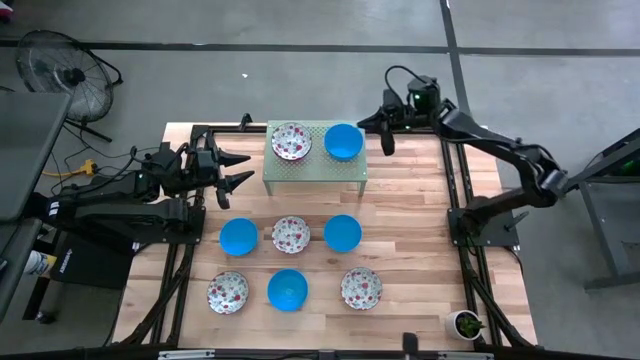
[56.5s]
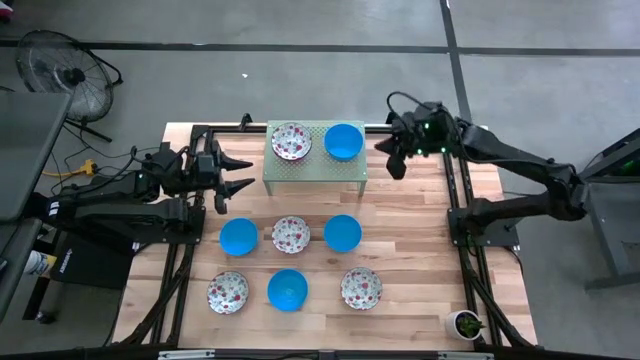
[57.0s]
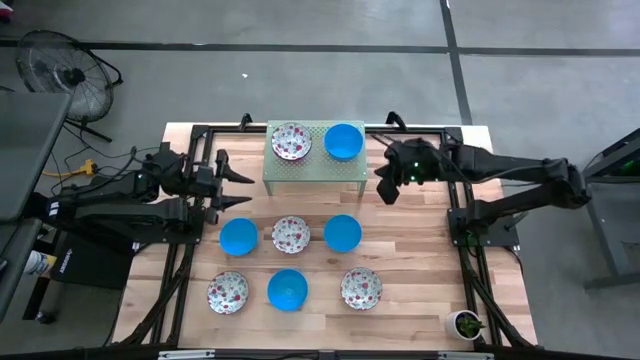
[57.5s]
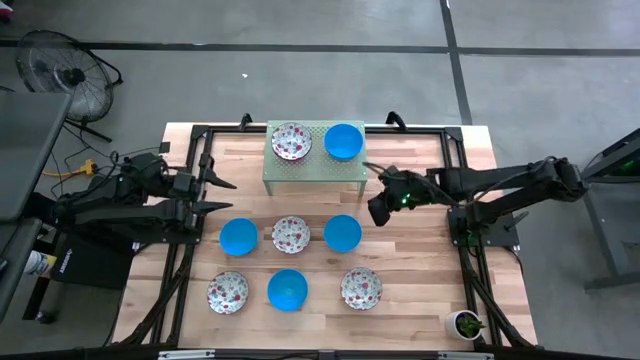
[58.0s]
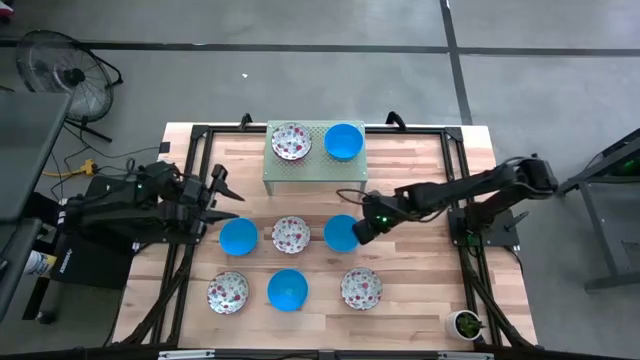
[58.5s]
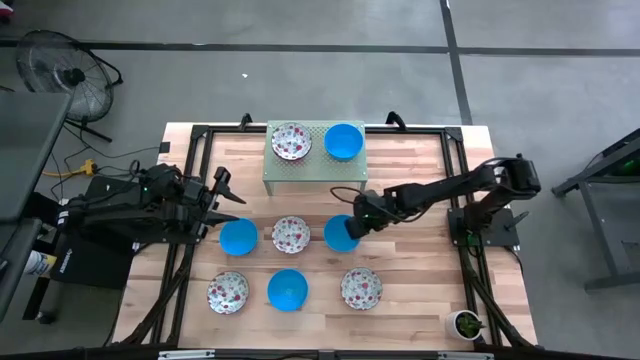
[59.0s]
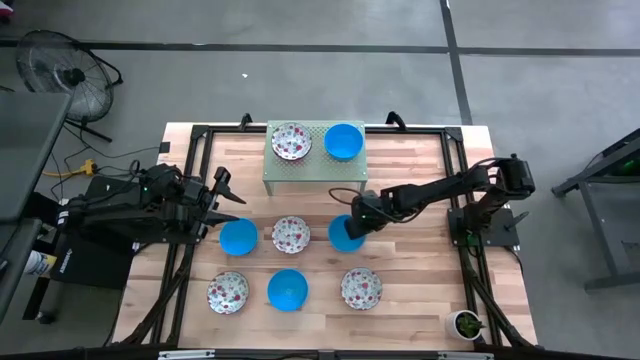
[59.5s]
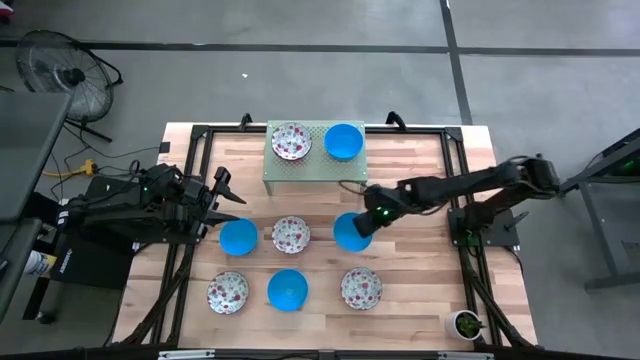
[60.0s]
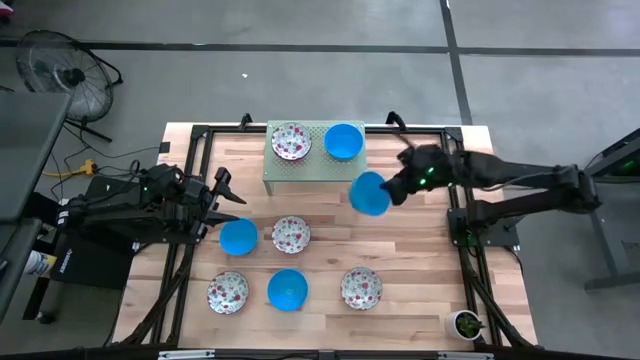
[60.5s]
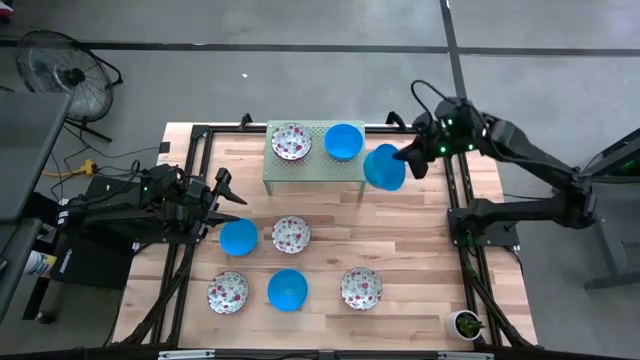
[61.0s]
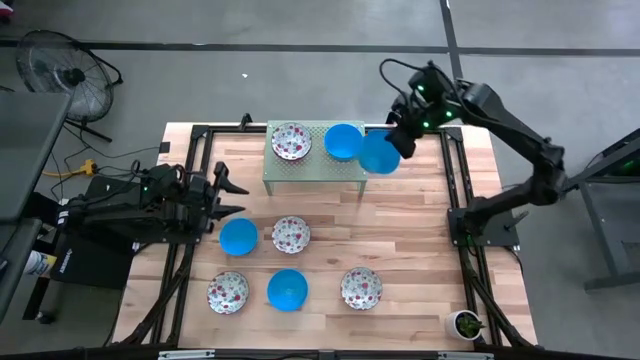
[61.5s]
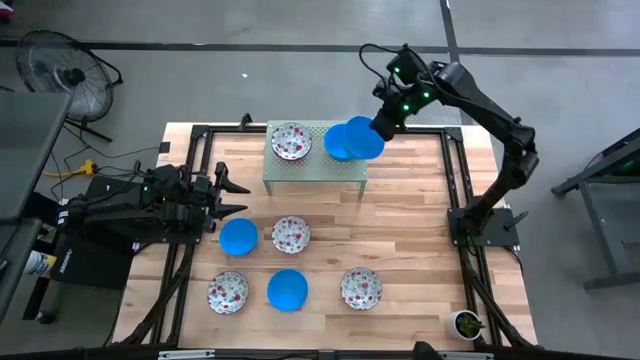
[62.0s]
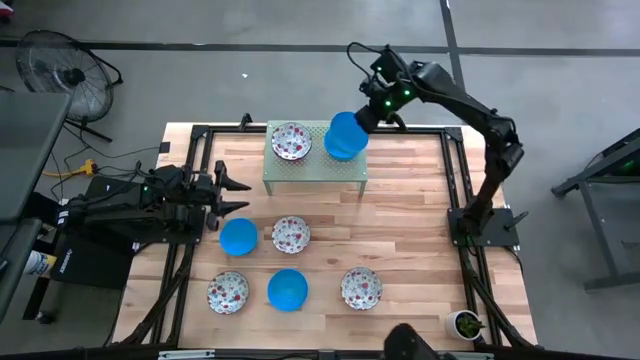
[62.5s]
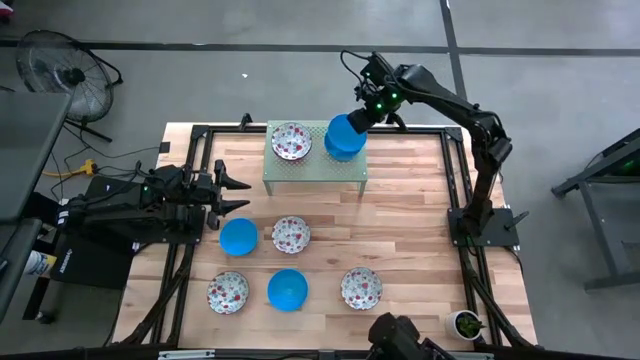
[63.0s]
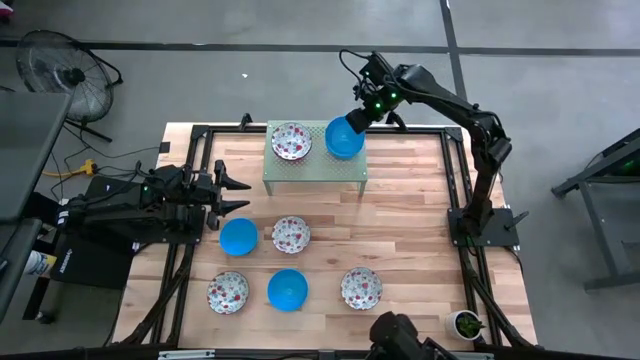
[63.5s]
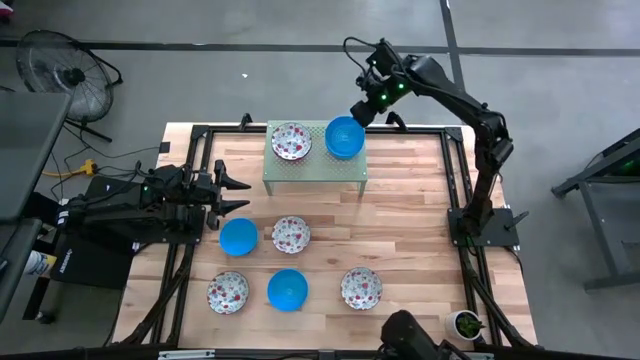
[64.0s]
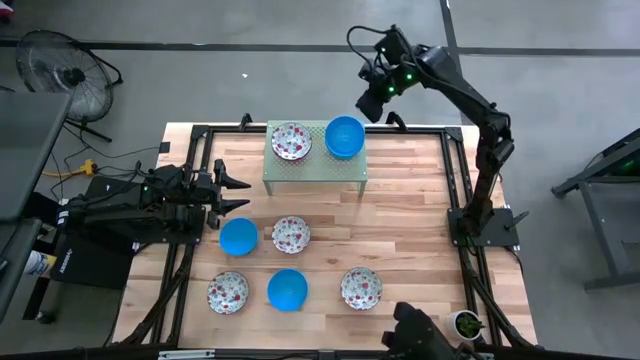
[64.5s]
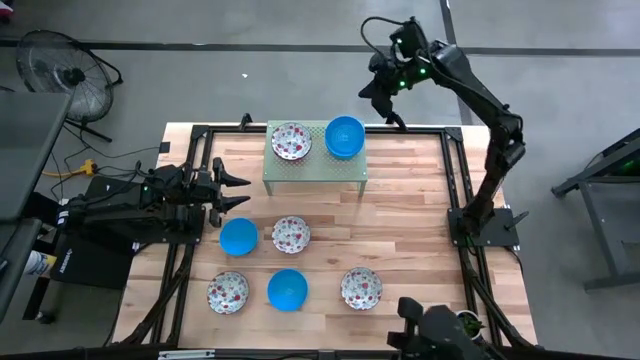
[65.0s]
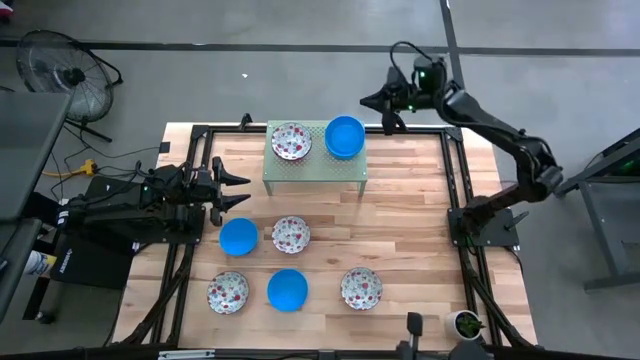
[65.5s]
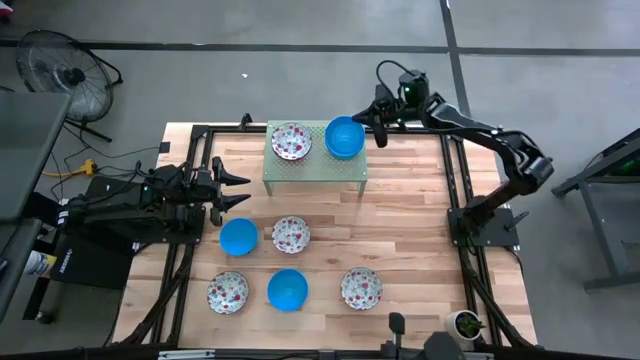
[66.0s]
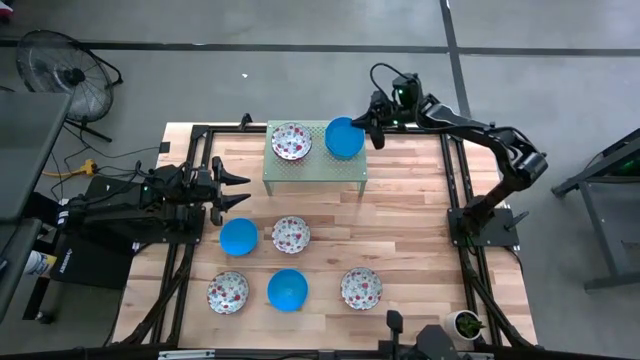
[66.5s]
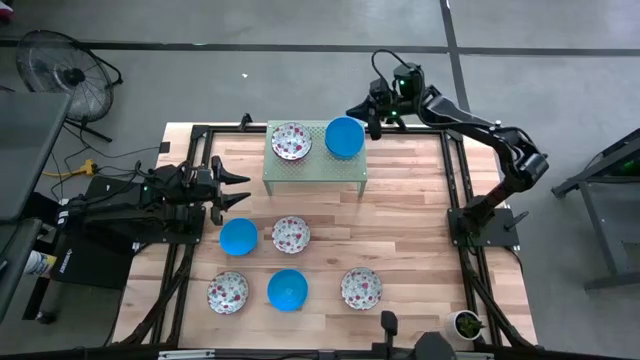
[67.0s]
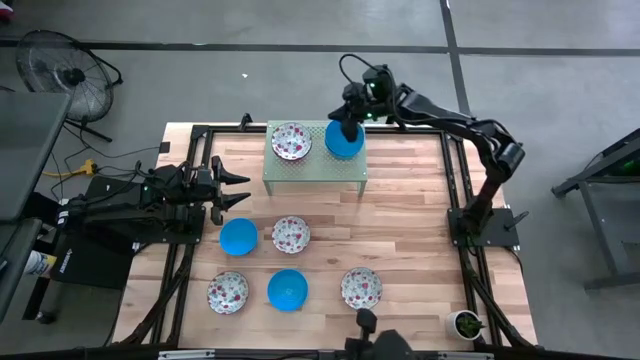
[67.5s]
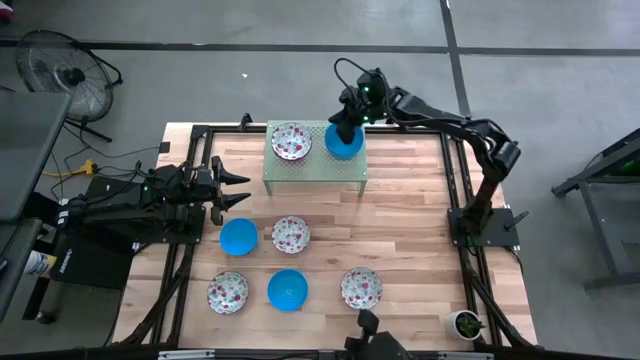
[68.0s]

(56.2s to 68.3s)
Task: Pick & Place Mini bowls
Stack the blue bowl on top of the stacked blue bowls on the shelf

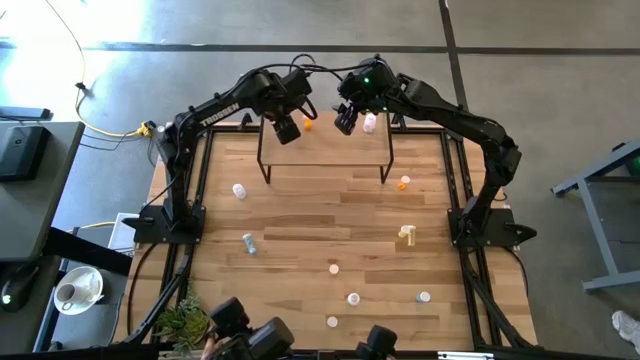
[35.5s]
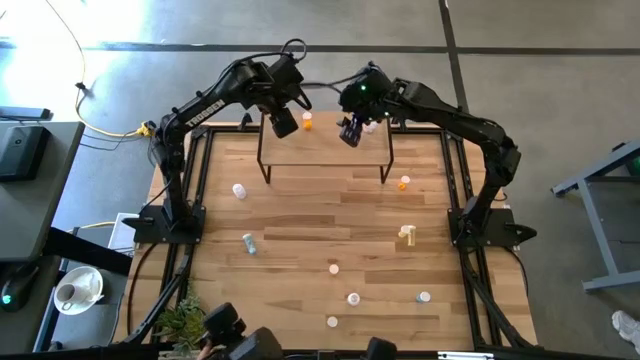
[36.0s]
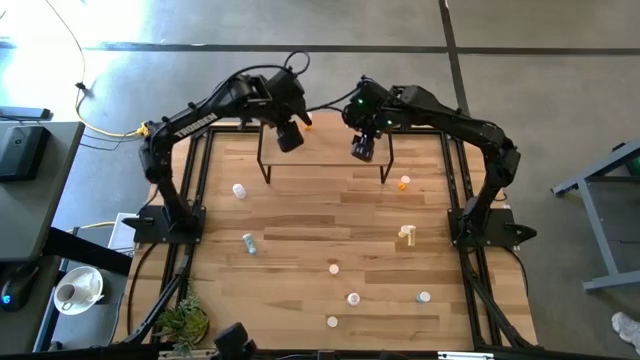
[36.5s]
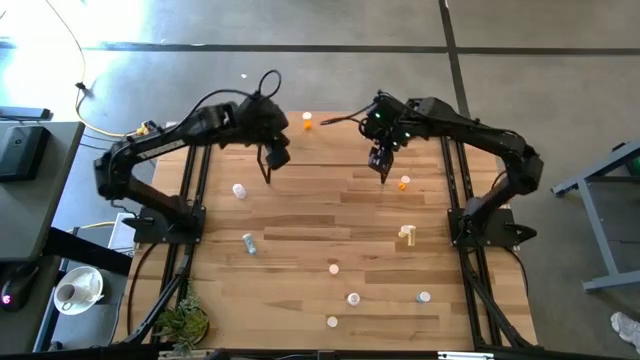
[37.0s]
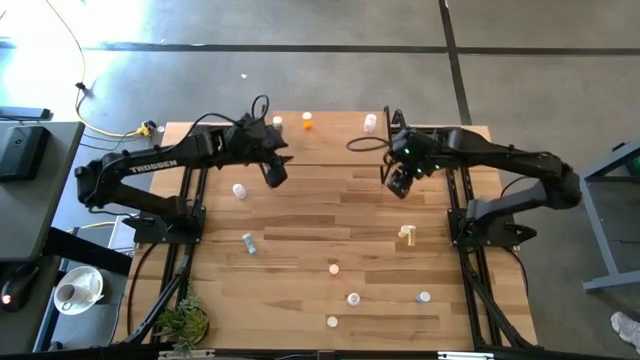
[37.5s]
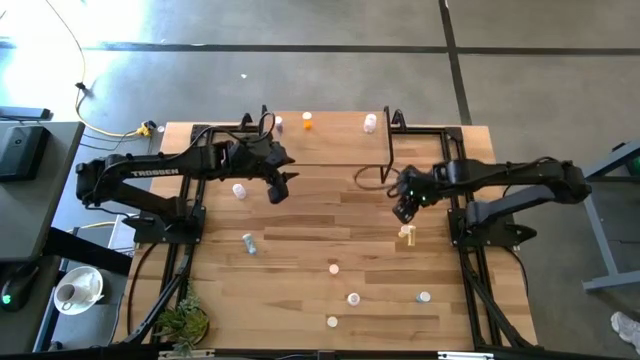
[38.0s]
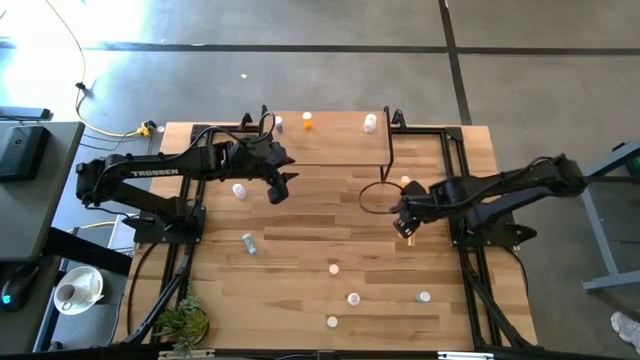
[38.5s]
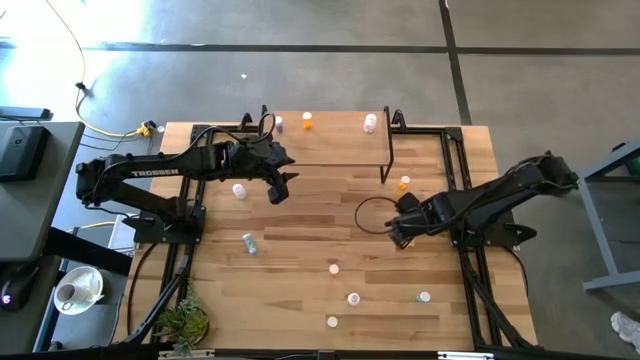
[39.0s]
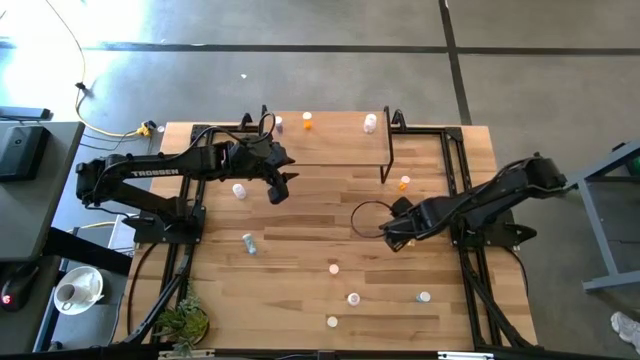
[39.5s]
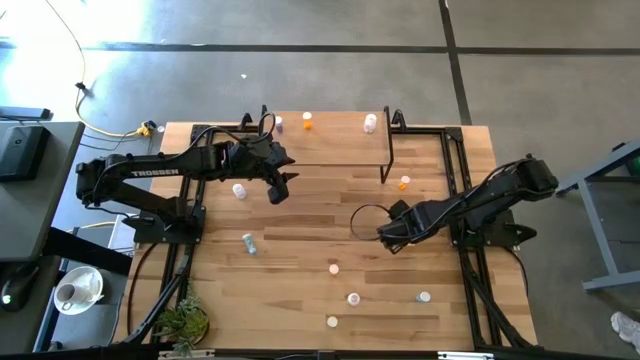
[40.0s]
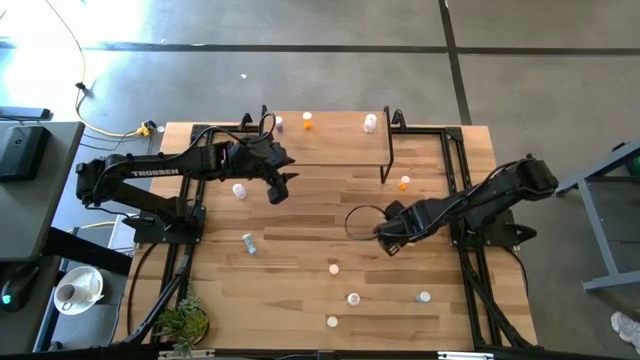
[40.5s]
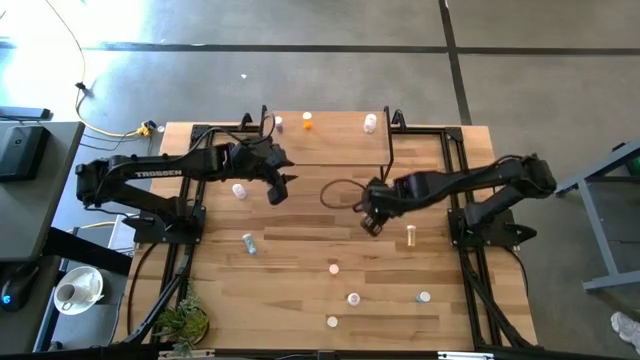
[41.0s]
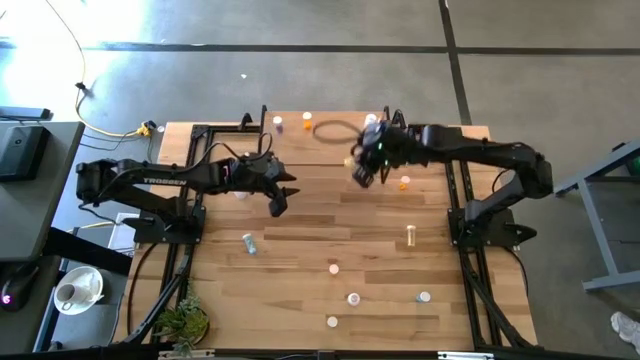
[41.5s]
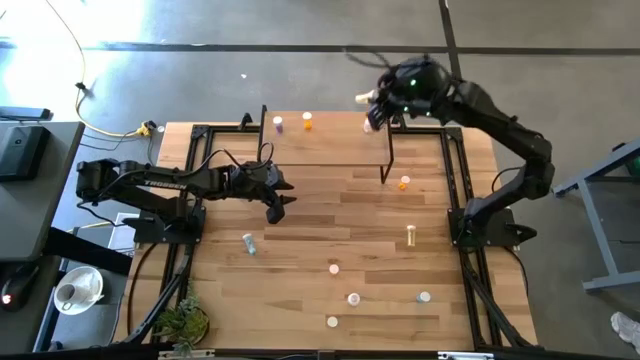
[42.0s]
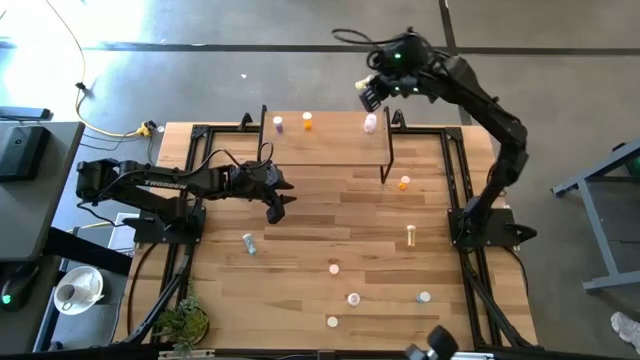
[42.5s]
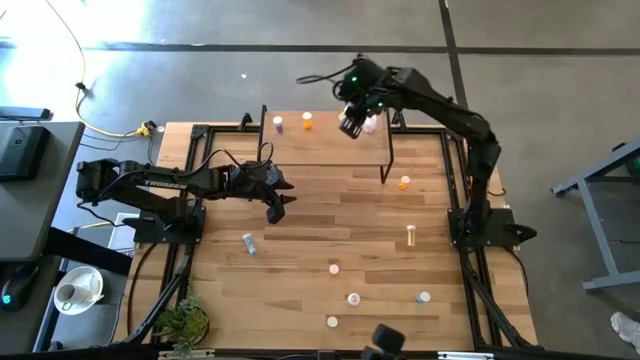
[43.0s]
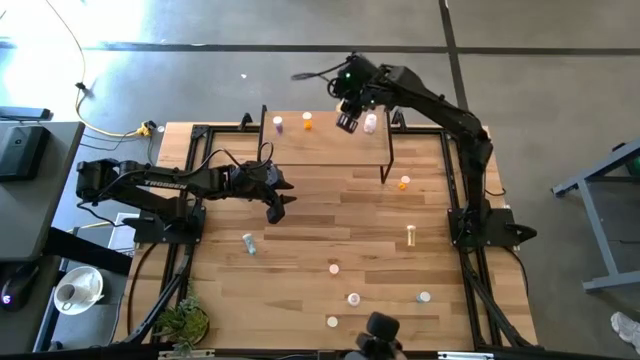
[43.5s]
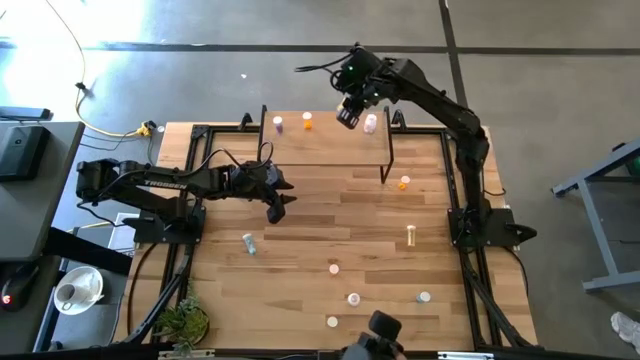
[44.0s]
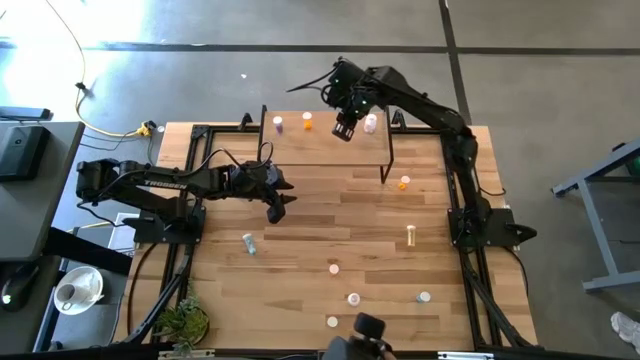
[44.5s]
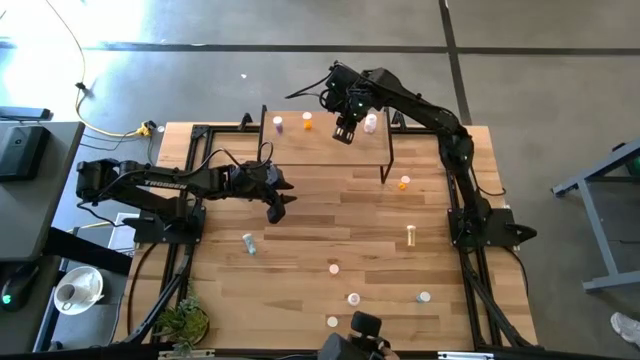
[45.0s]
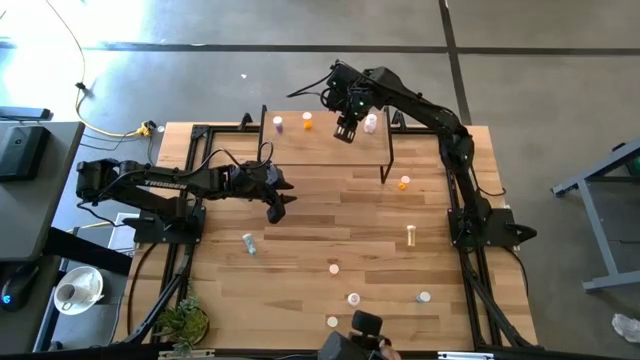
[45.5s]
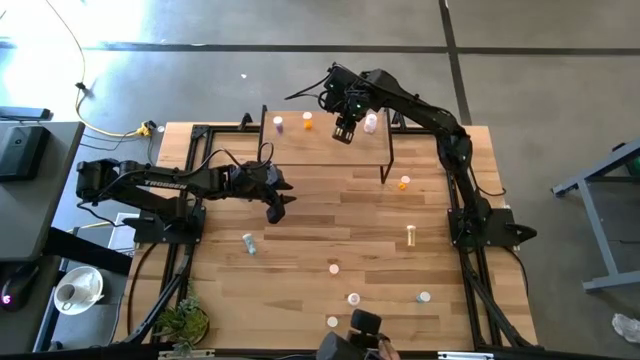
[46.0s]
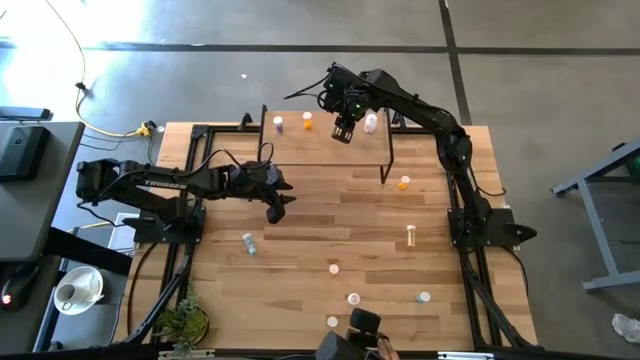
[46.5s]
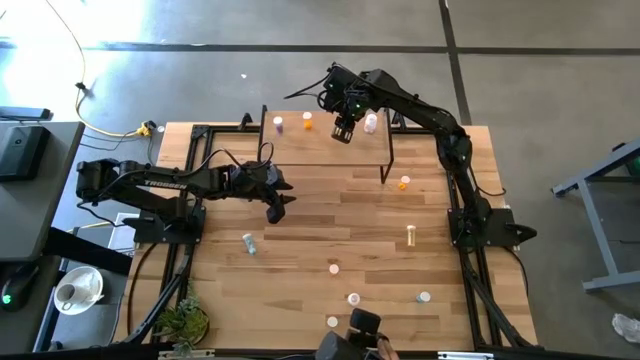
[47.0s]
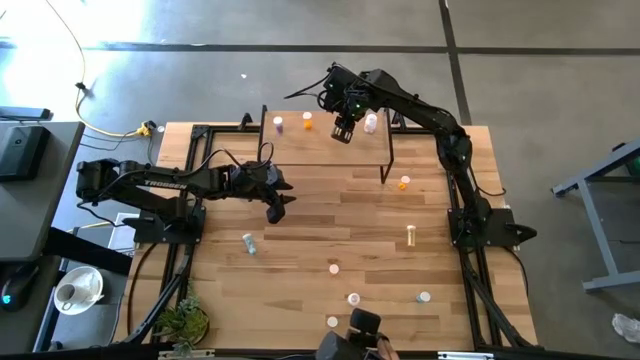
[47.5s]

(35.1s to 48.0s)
Task: Pick and place medicine bottles onto shelf by color
Put the top left yellow pill bottle on the shelf
